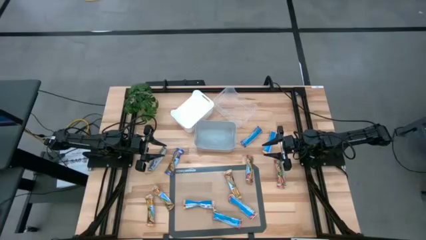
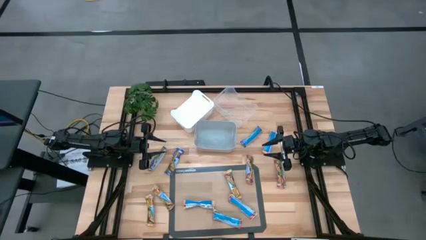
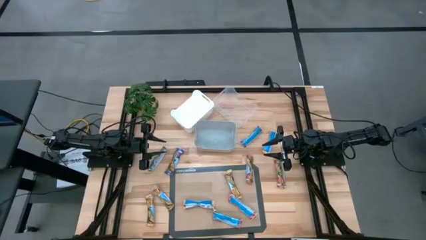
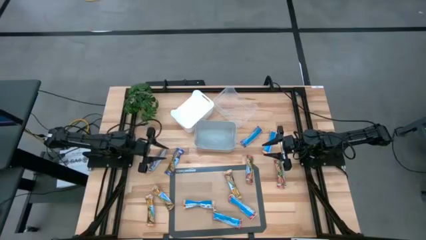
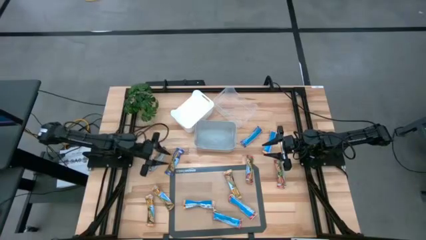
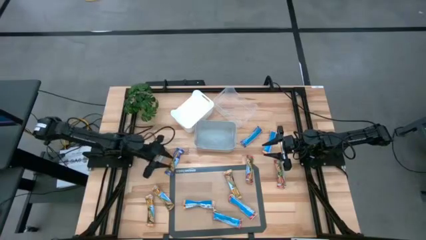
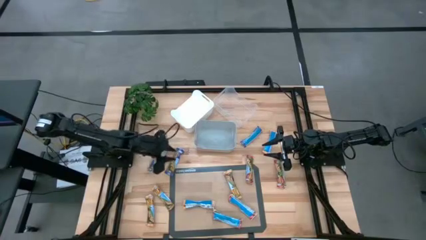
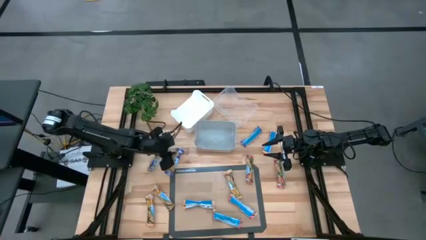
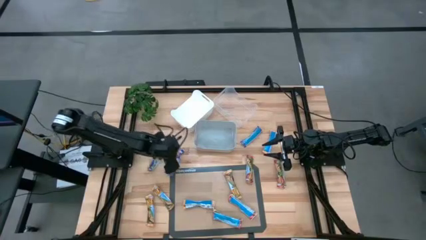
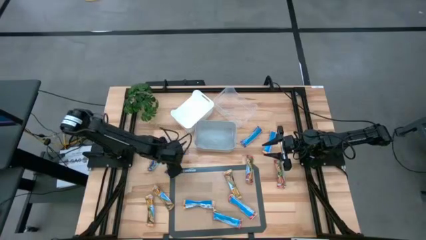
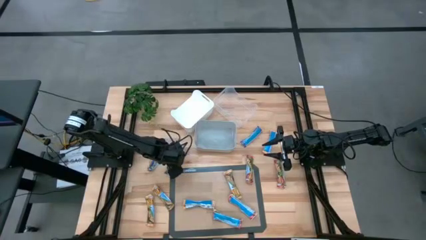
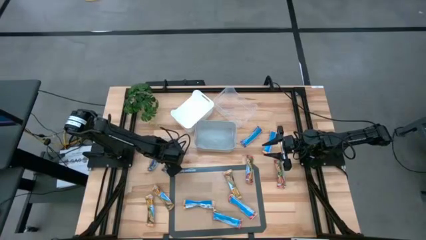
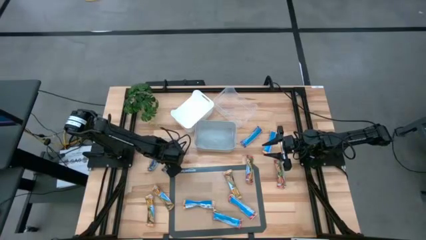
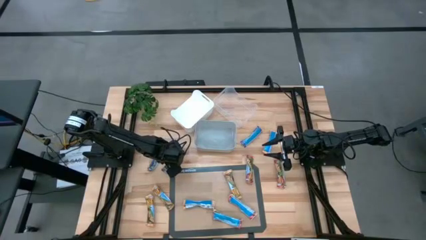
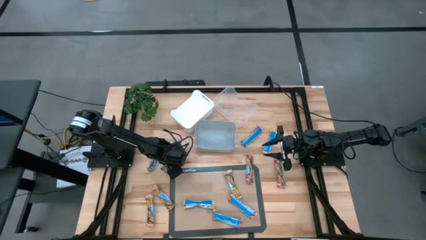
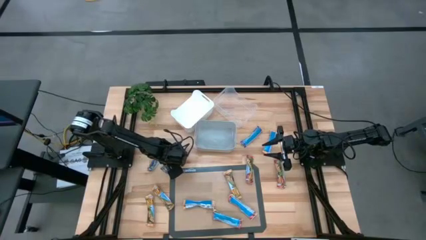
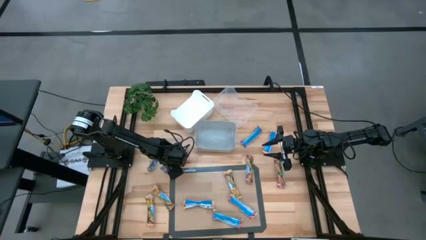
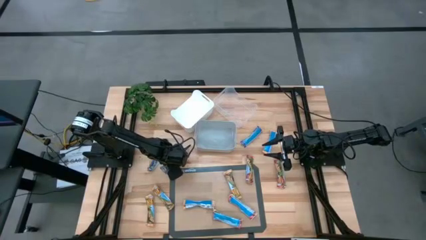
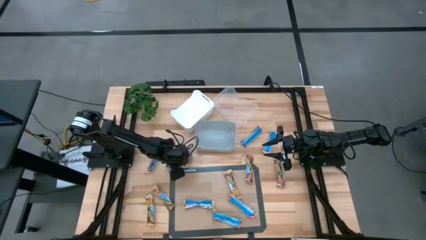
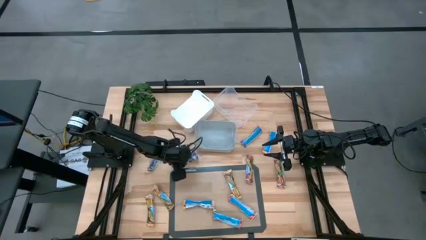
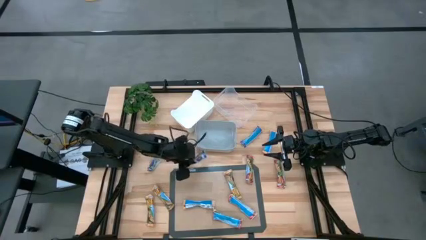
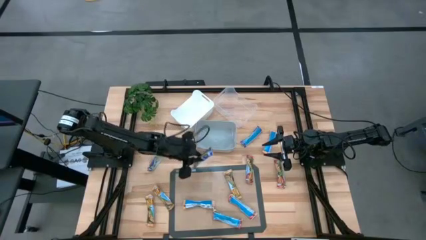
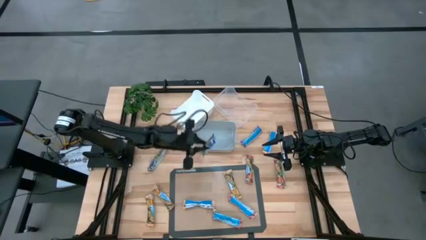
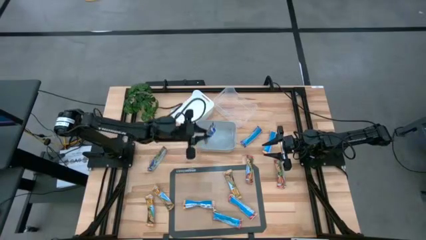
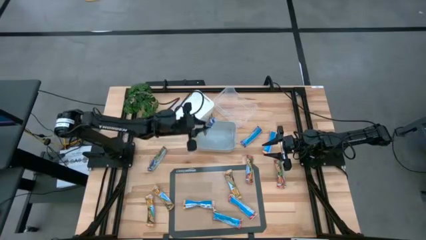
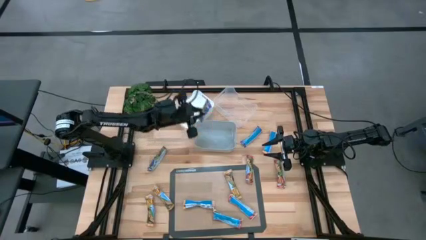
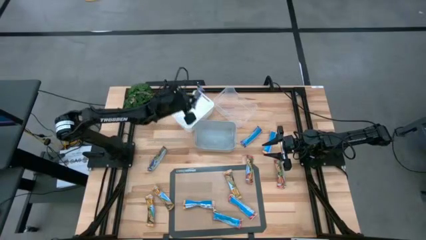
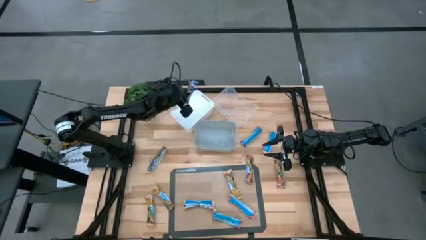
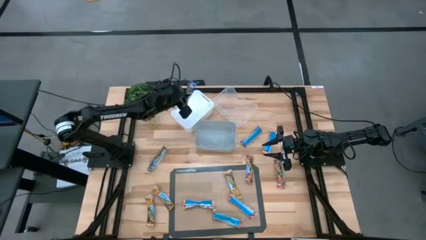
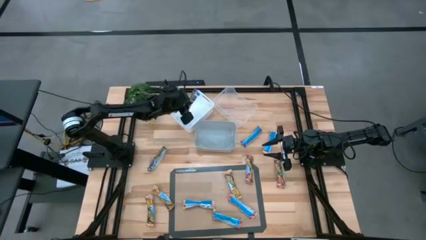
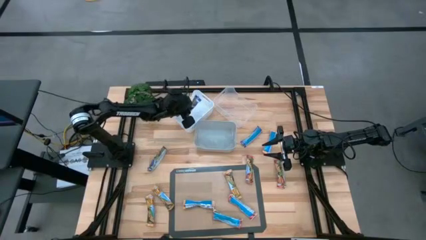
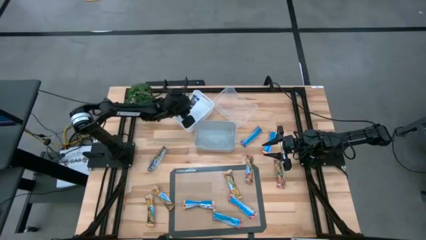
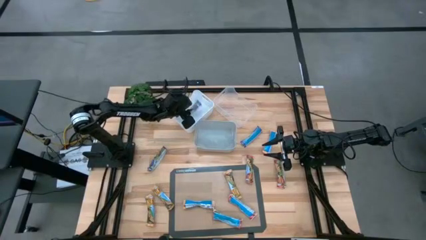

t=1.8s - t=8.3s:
Task: Pick and place Granola Bars by type
Put the blue granola bar into the white bin

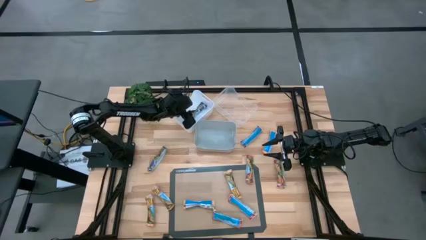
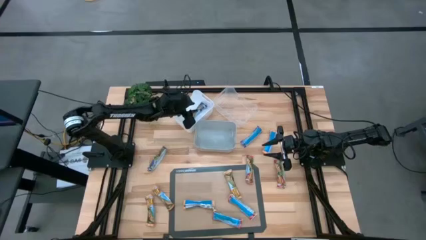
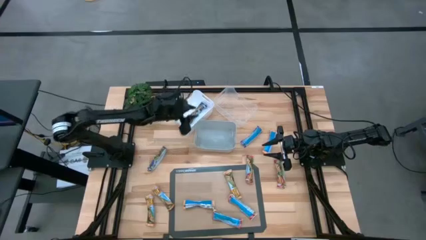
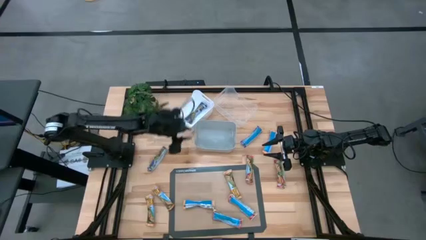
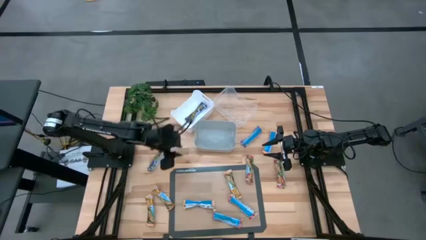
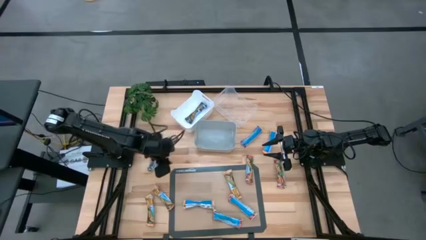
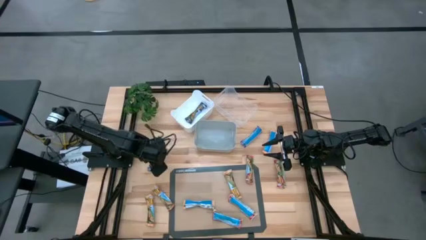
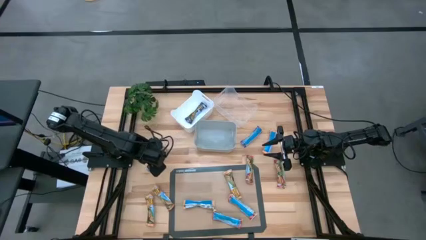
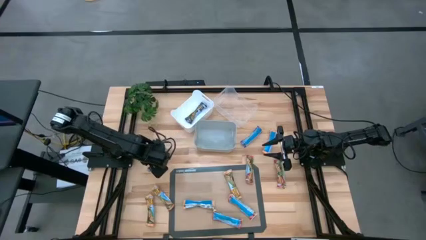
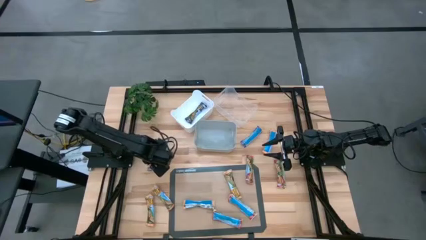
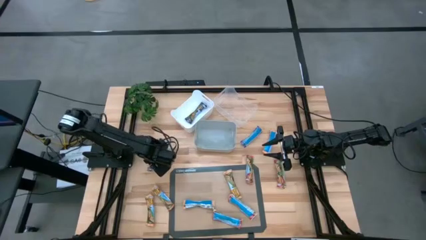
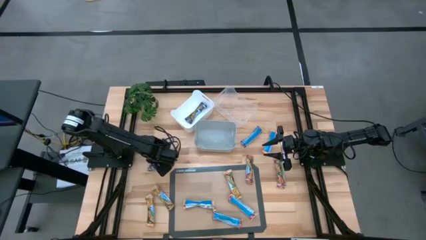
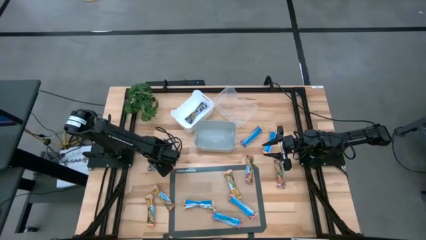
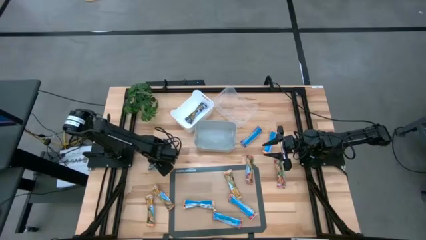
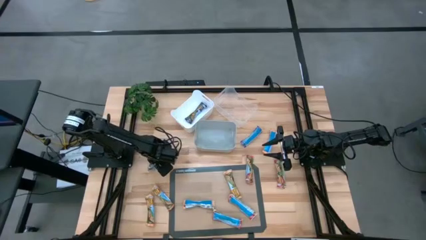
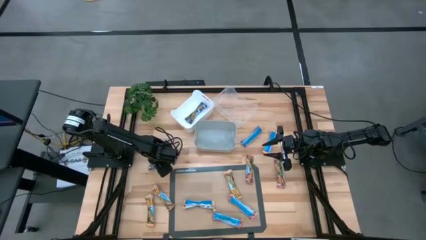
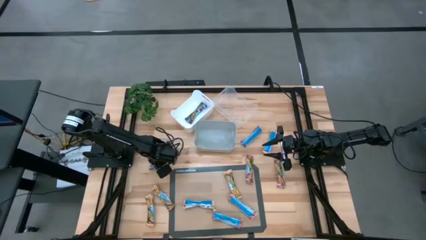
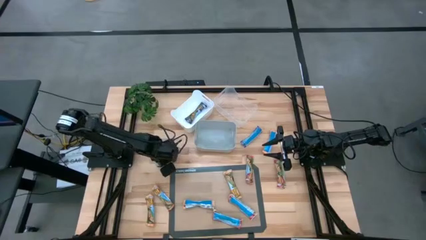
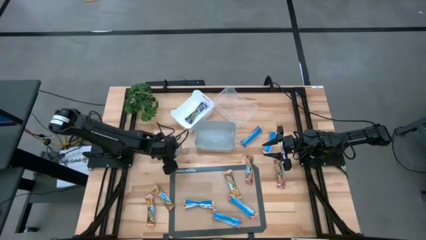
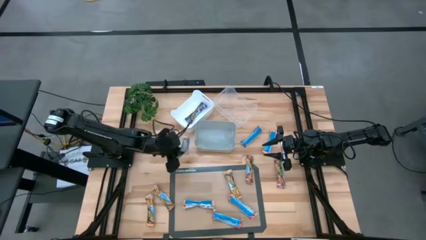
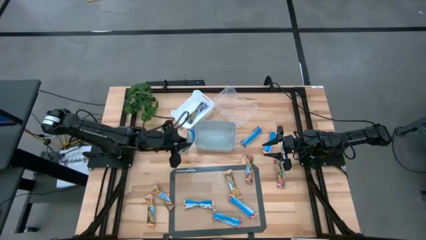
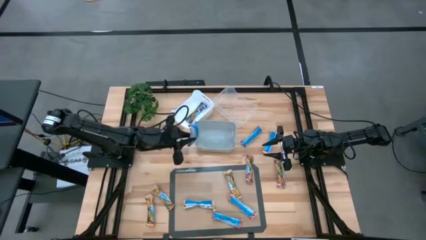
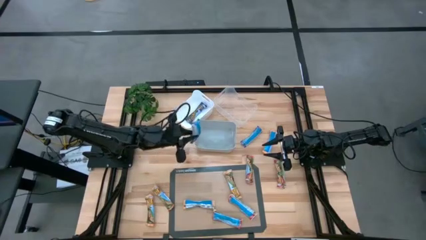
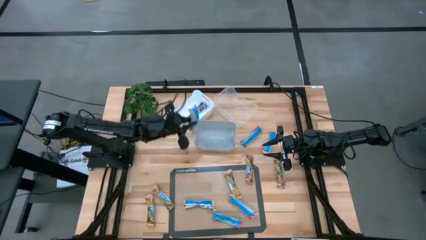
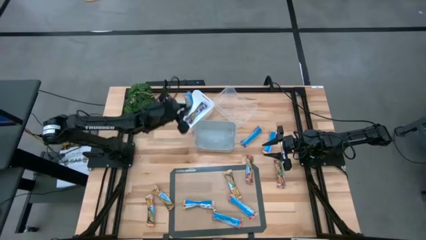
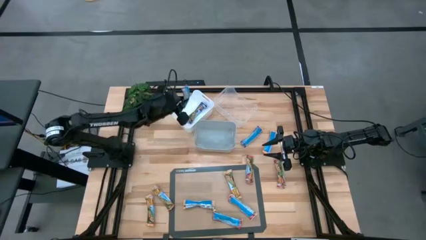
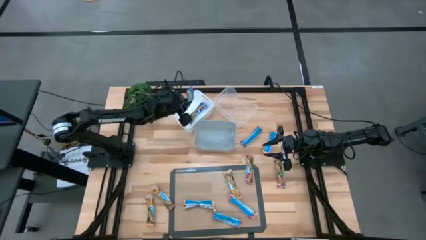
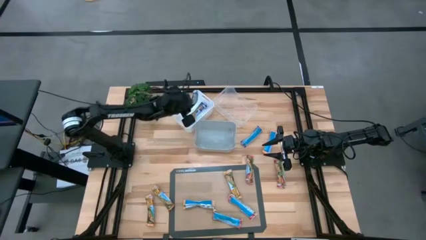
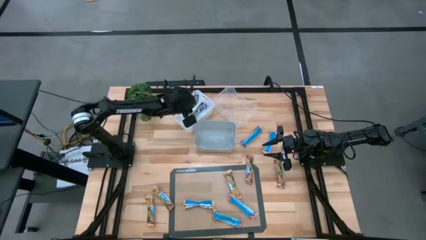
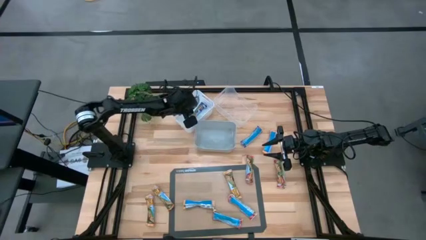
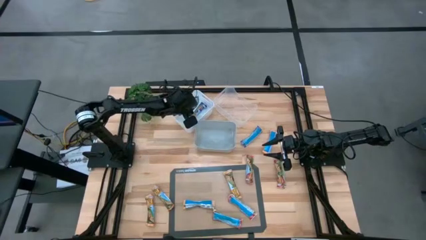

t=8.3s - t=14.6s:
Put the blue granola bar into the white bin

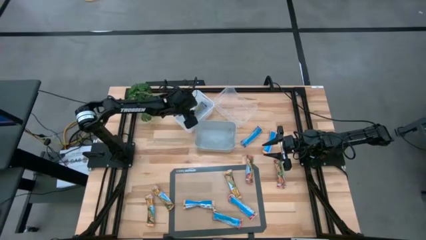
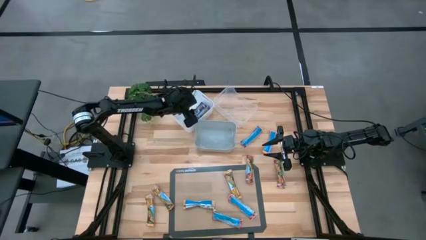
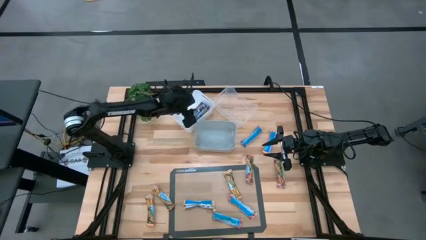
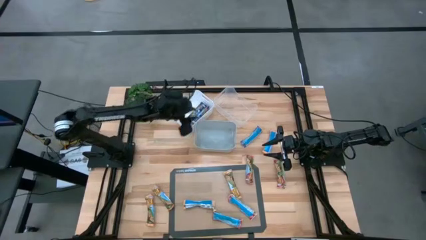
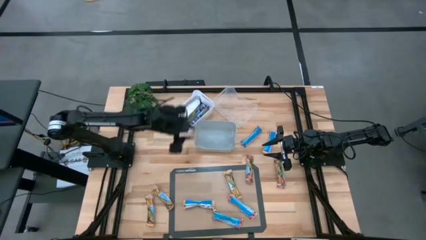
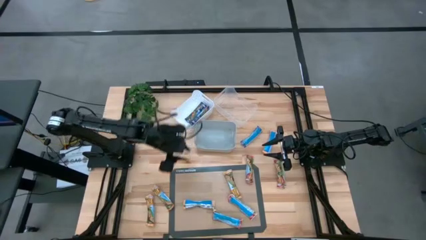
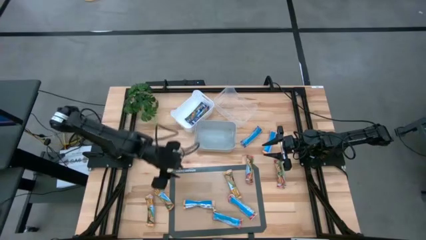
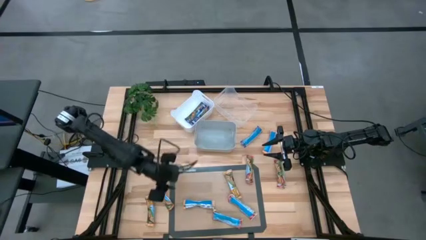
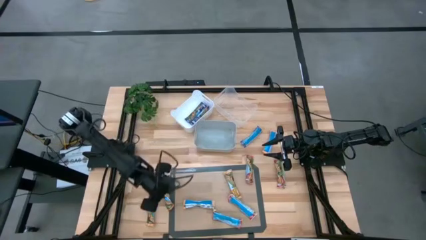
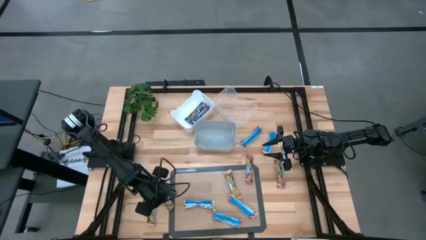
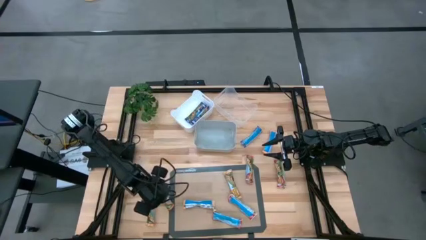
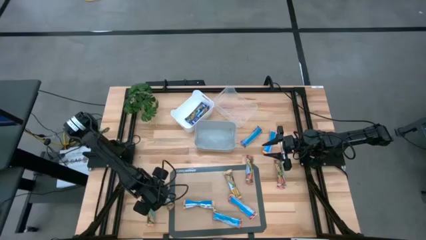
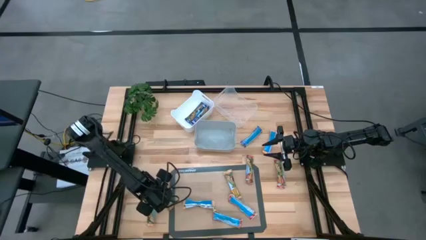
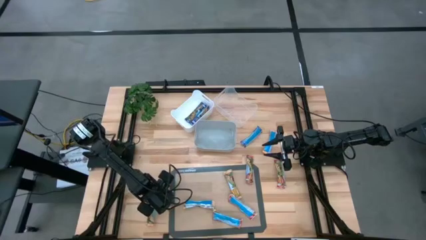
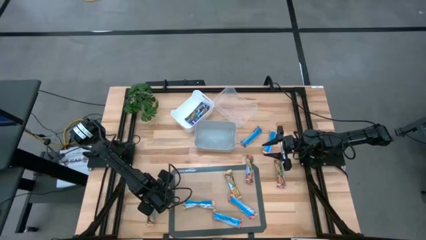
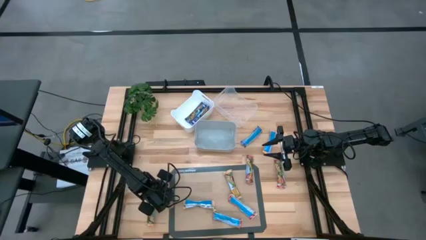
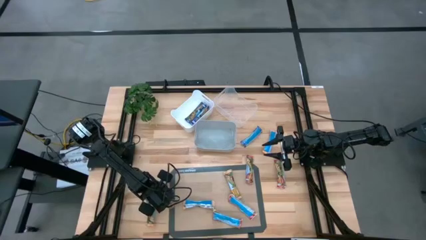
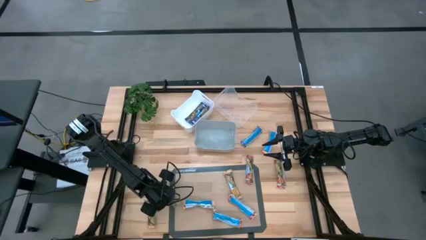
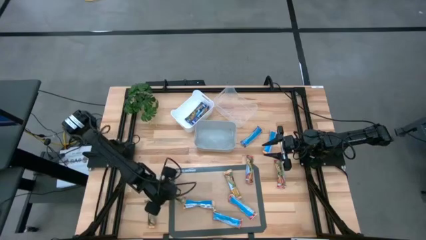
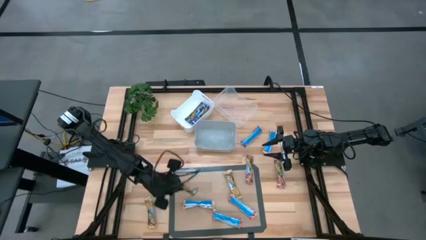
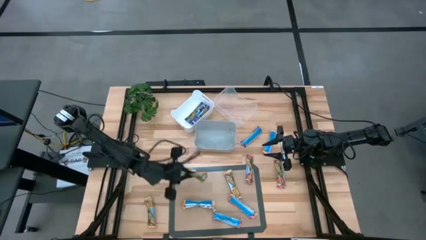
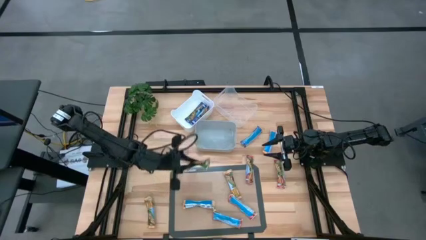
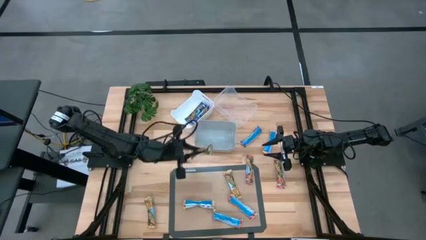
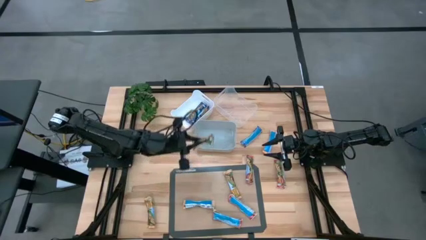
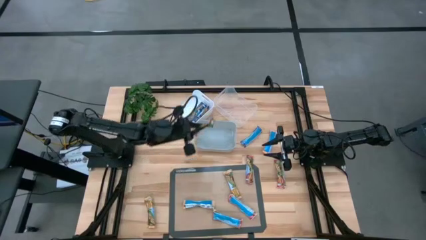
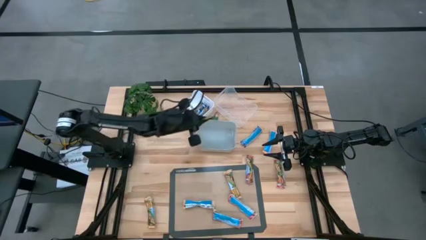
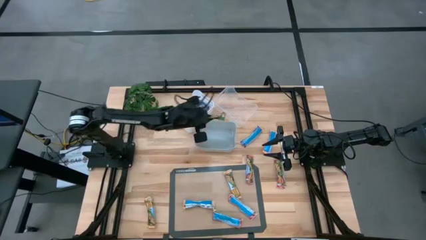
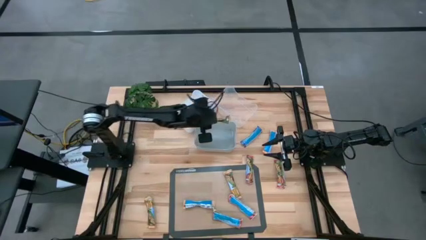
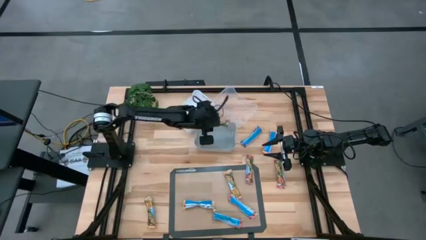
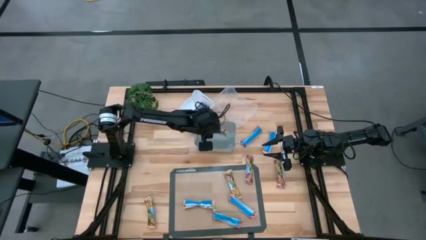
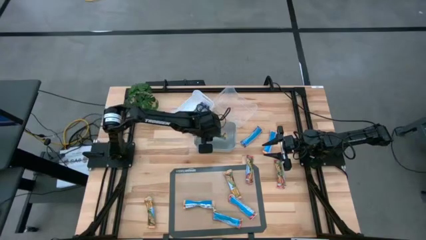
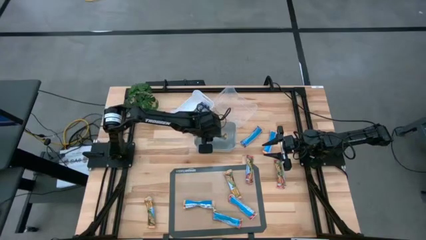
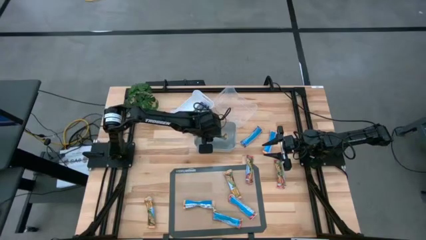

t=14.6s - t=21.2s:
Put the yellow granola bar into the gray bin
